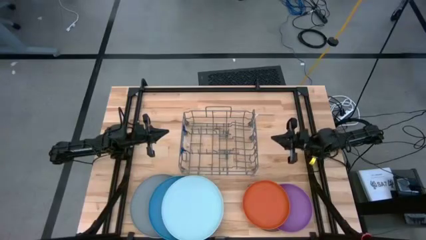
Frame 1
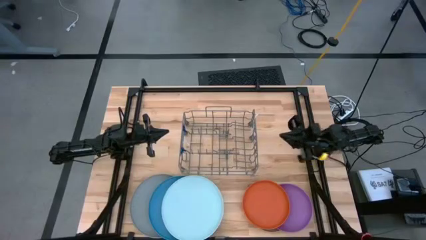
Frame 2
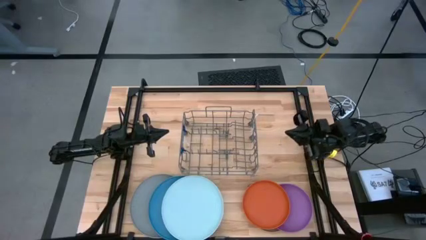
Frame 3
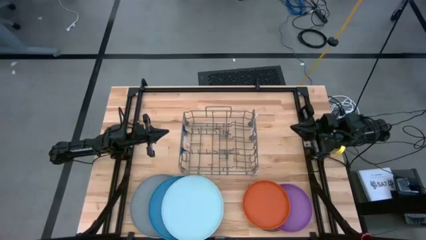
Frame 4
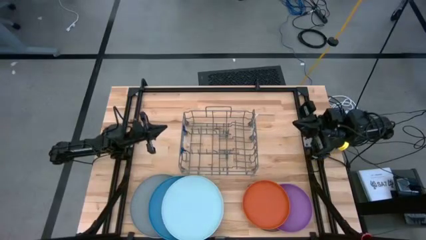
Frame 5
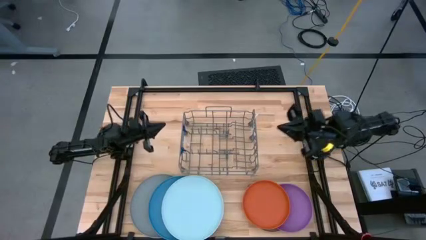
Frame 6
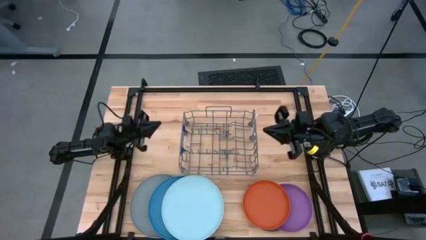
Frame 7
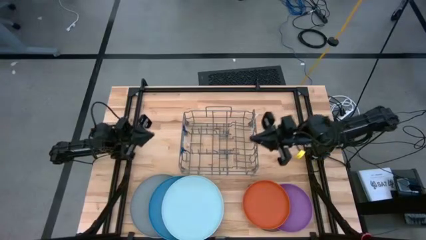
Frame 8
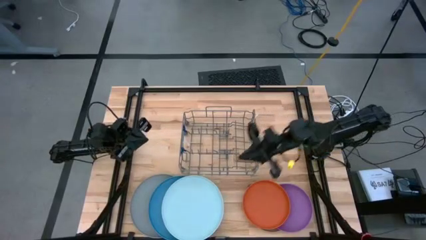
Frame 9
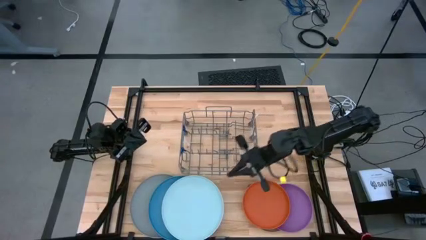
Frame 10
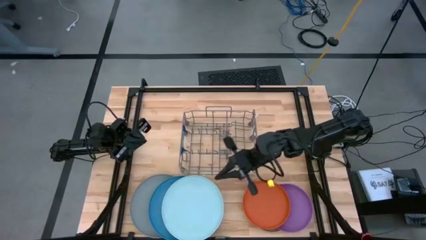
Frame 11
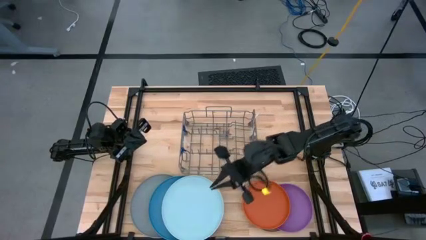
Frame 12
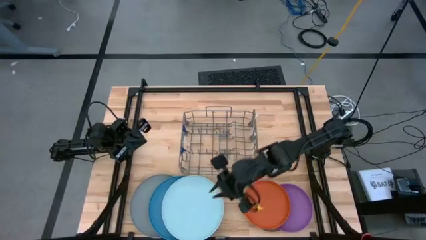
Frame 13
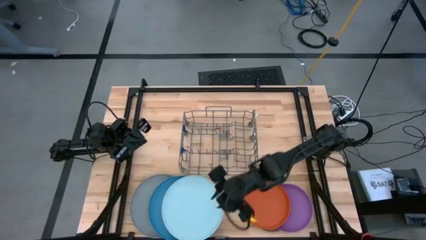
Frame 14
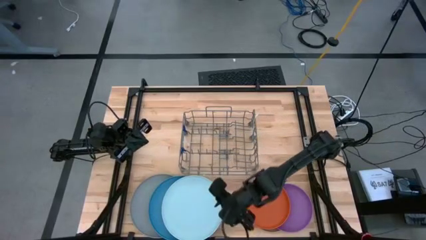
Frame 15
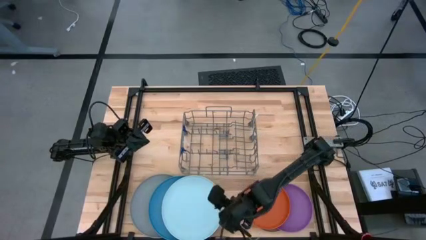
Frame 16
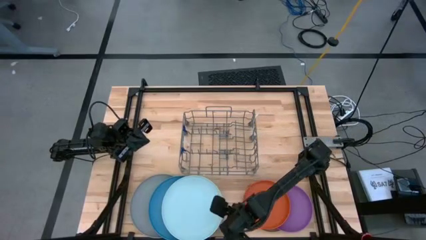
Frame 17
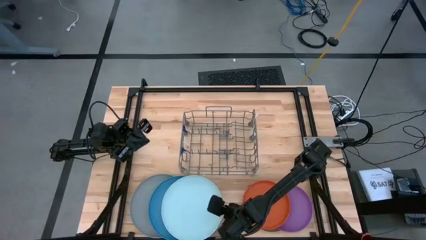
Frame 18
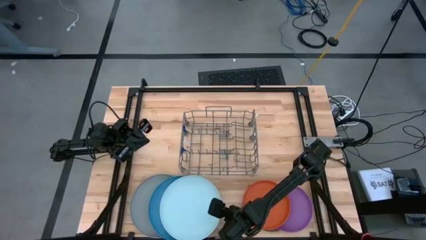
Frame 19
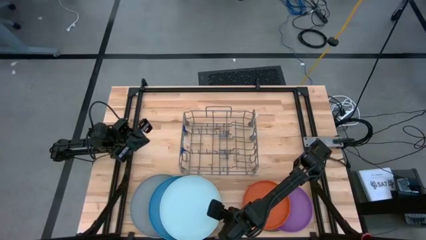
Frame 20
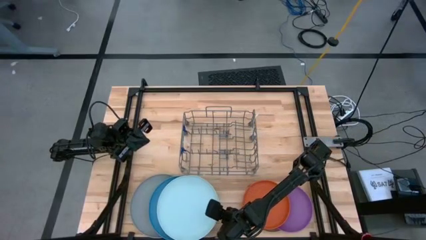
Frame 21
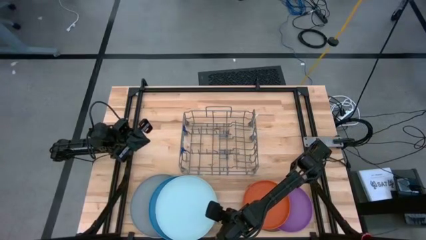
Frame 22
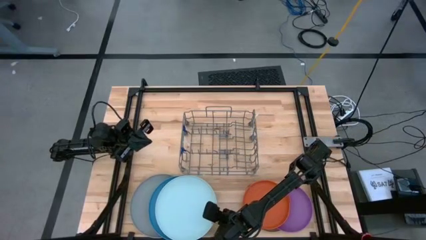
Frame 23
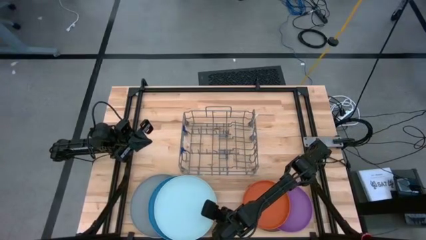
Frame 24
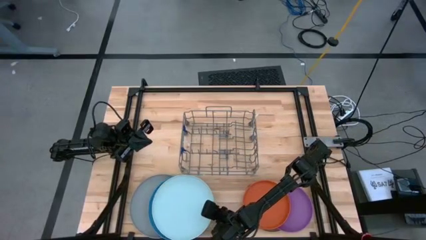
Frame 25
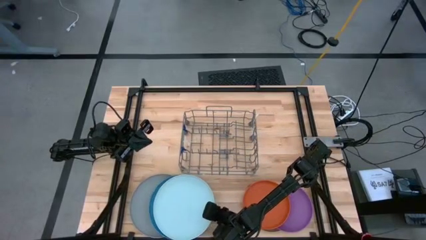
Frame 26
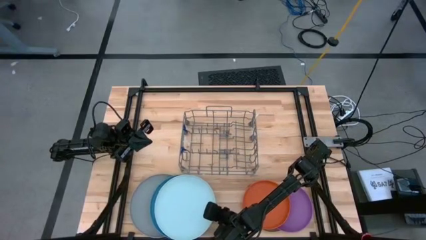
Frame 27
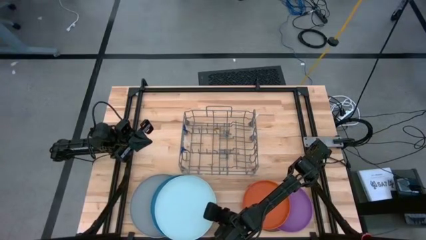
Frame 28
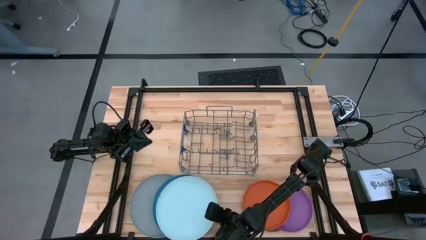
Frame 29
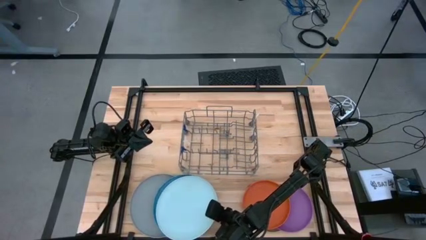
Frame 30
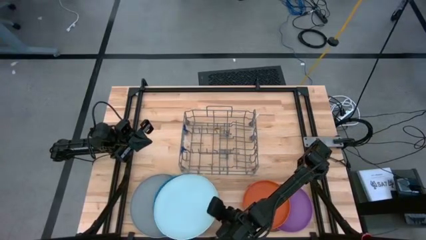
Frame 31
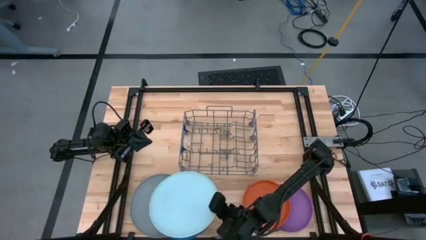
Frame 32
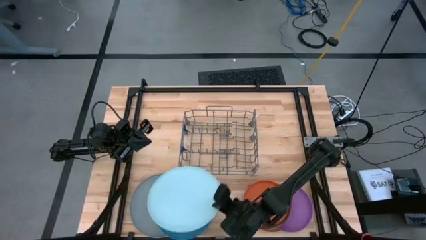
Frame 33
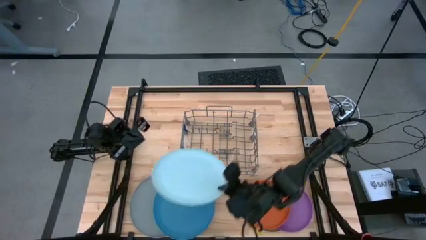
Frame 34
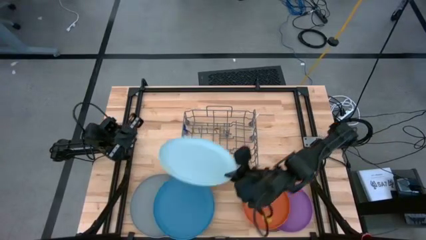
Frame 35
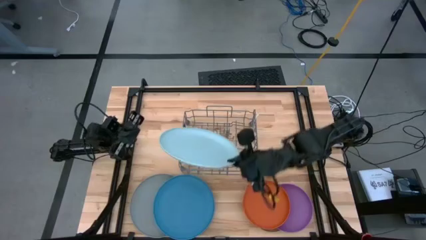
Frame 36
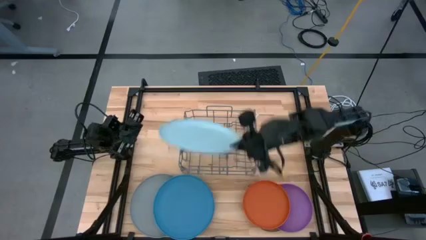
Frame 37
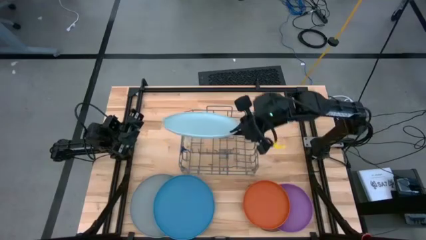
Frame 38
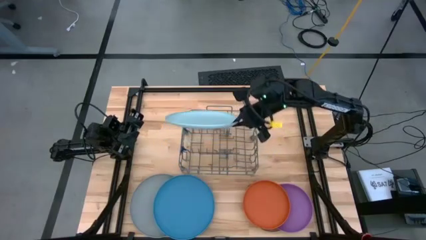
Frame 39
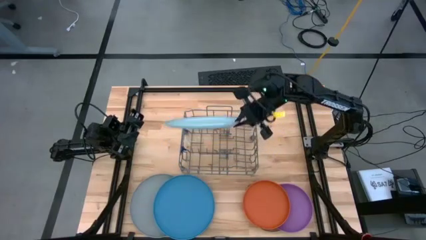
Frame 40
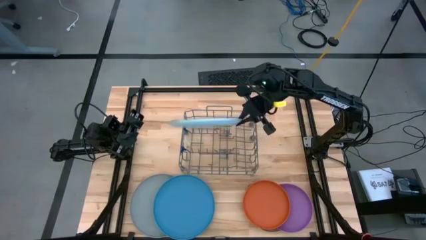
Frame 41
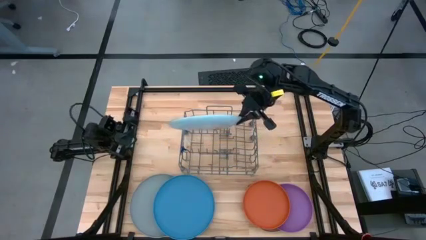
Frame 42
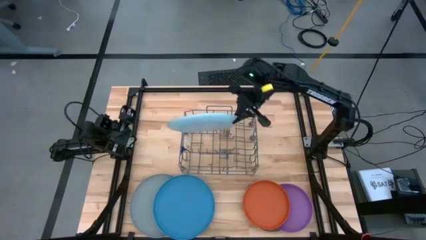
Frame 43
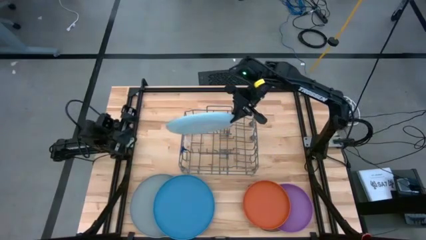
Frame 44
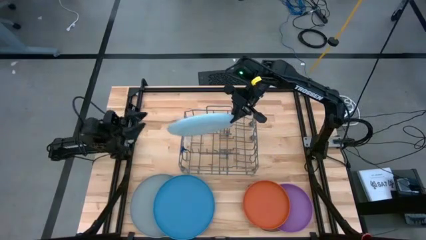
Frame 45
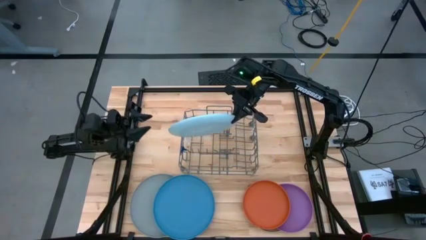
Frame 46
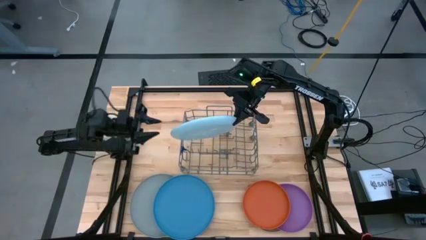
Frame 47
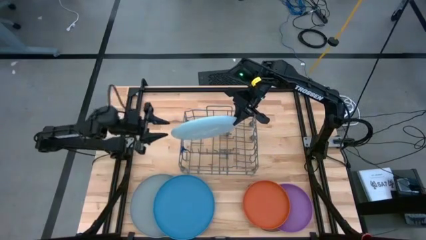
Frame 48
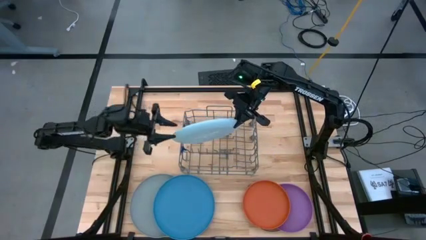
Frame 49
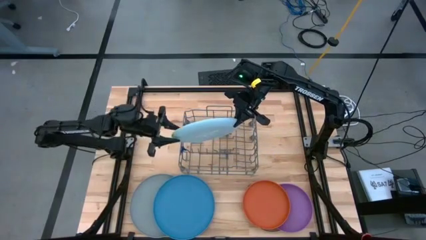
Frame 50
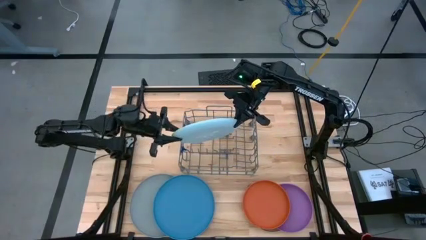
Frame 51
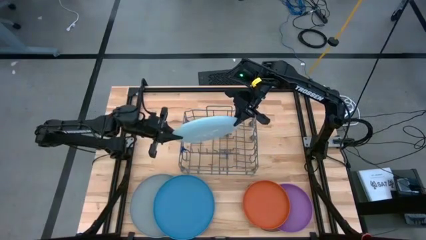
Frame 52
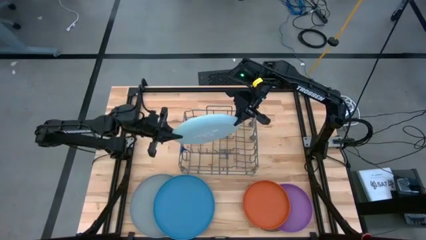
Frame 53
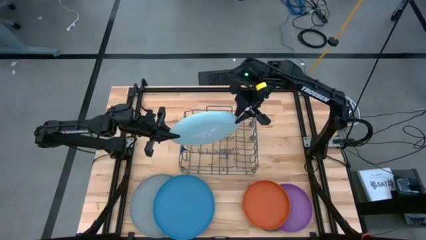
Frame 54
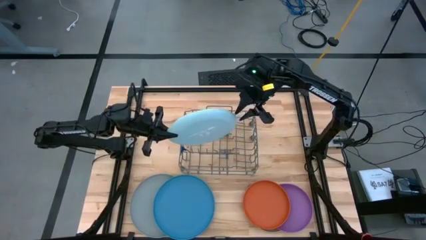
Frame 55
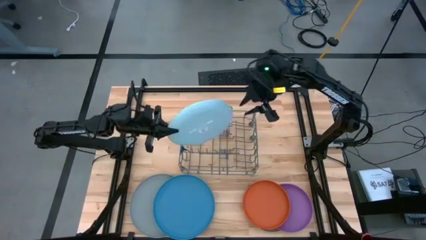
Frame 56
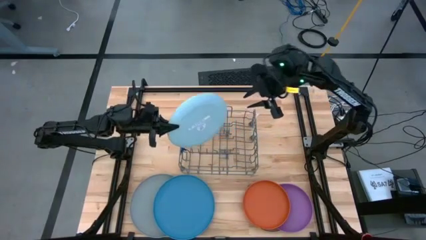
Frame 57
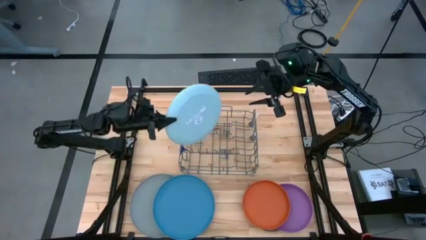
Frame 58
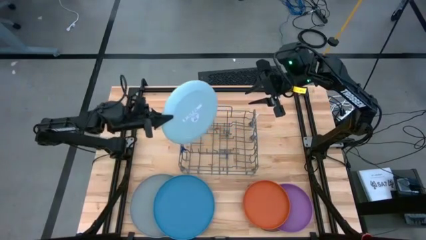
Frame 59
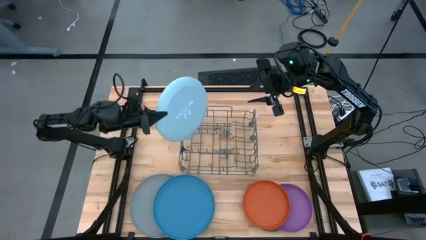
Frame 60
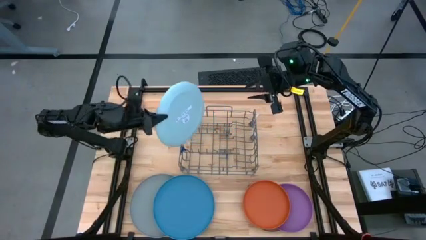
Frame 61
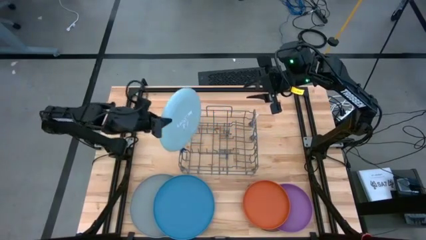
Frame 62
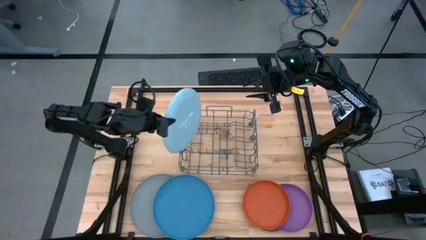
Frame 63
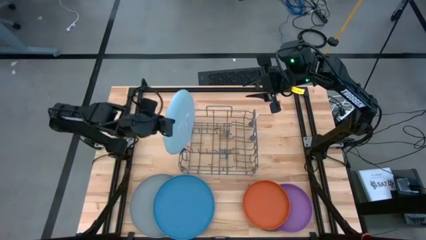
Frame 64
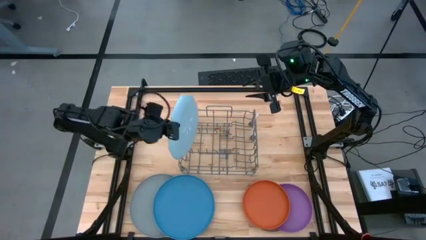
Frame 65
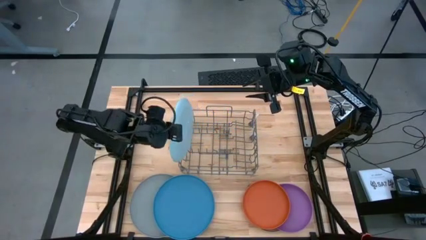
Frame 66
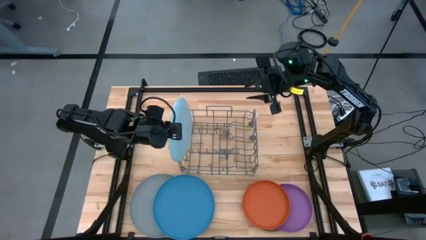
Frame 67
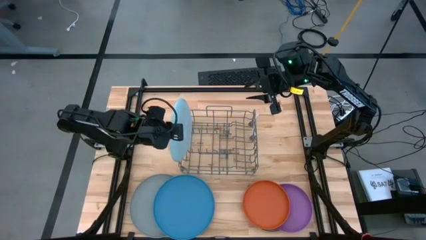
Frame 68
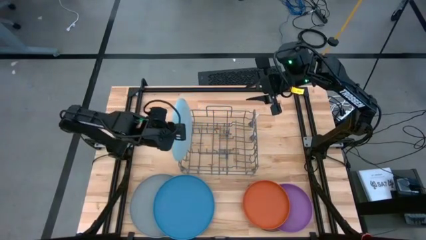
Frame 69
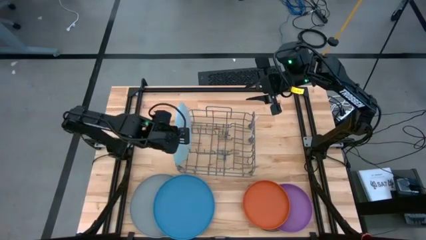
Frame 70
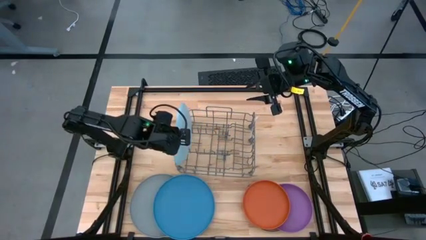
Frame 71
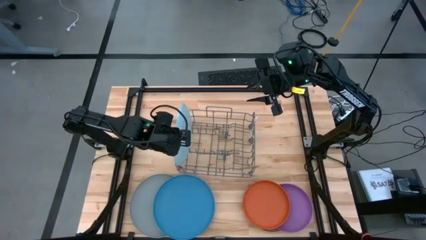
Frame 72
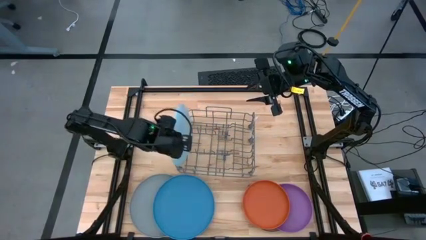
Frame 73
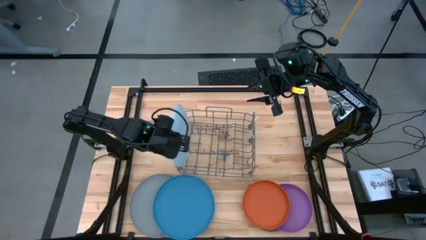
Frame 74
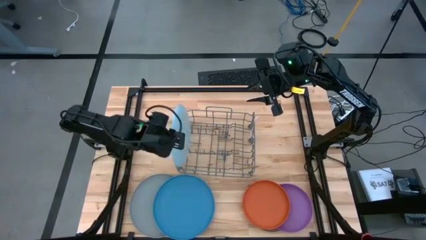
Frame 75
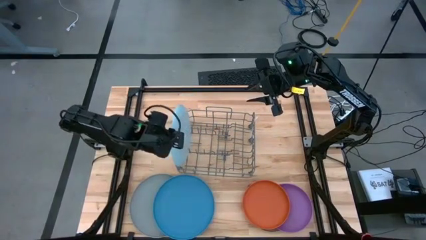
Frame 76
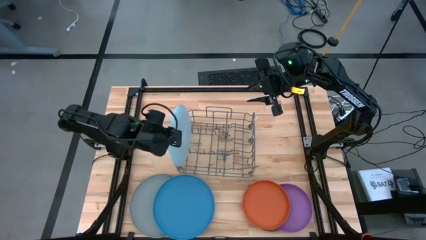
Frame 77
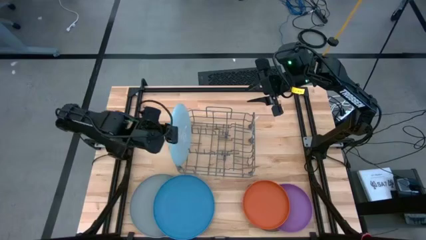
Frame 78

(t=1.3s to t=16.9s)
Task: Sort dishes
Put the light blue plate in the dish rack
